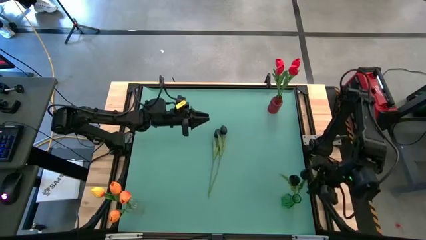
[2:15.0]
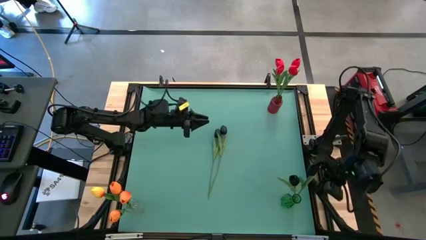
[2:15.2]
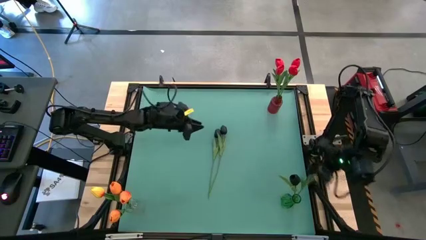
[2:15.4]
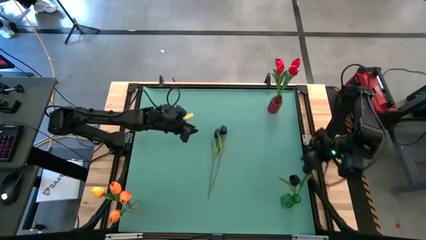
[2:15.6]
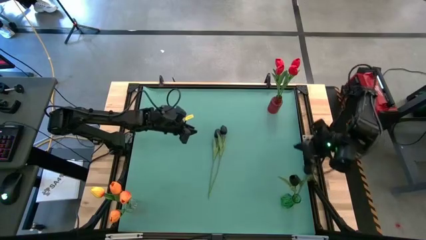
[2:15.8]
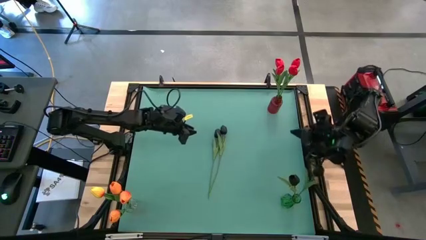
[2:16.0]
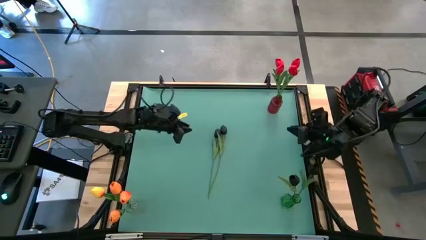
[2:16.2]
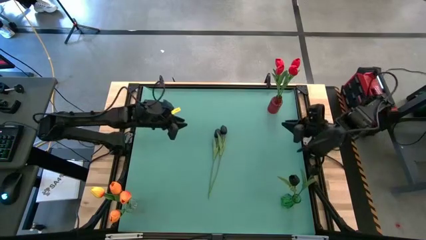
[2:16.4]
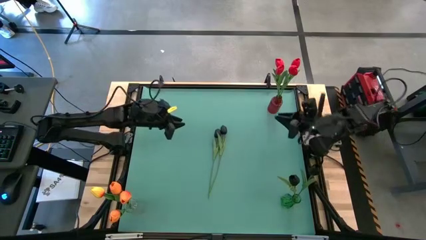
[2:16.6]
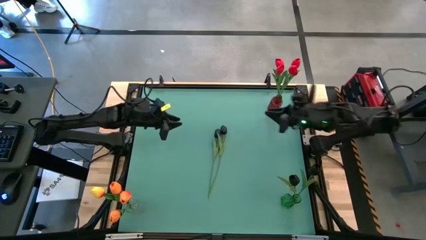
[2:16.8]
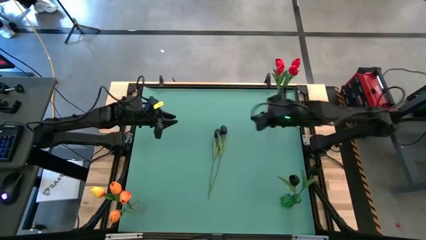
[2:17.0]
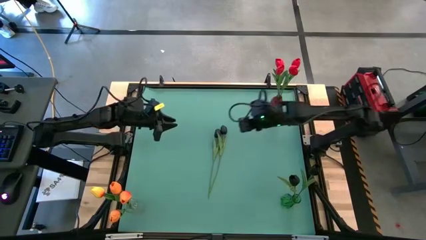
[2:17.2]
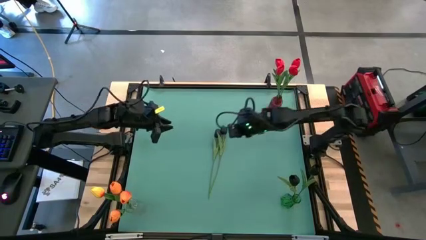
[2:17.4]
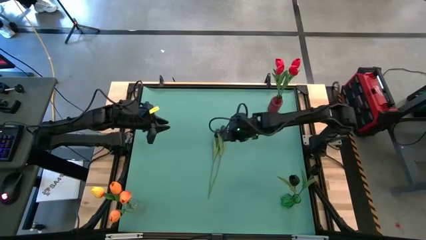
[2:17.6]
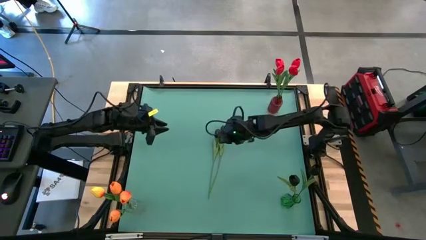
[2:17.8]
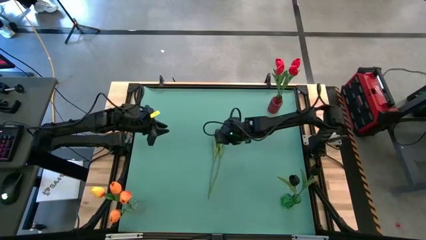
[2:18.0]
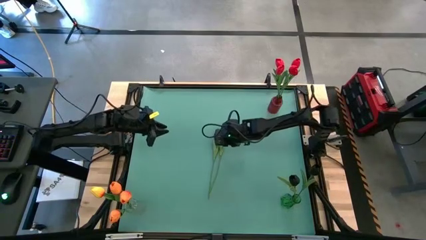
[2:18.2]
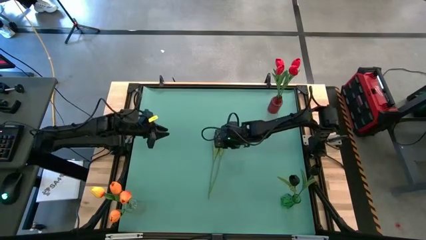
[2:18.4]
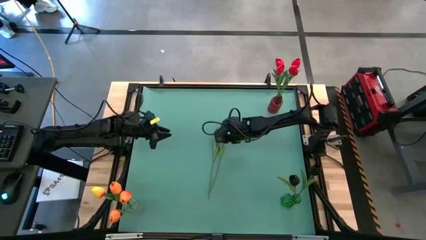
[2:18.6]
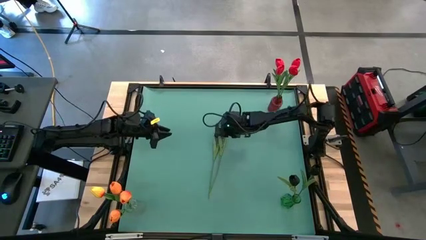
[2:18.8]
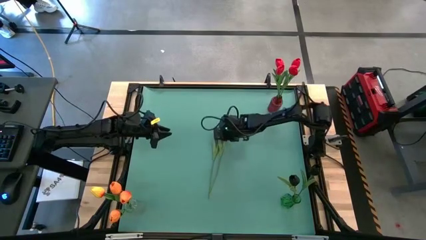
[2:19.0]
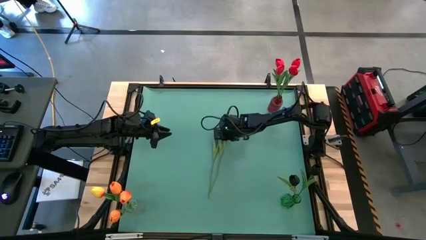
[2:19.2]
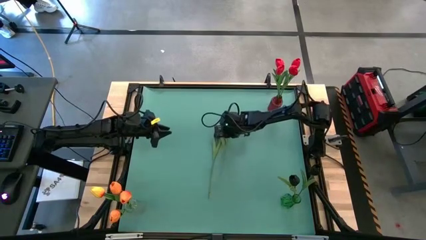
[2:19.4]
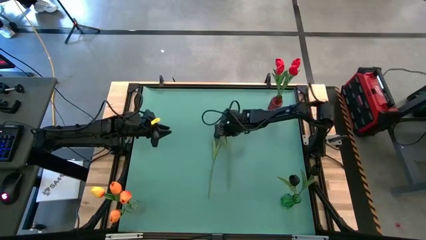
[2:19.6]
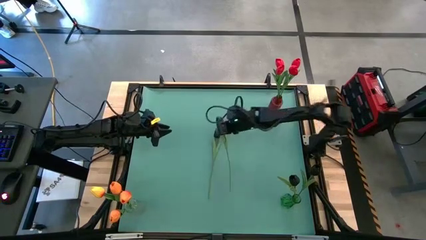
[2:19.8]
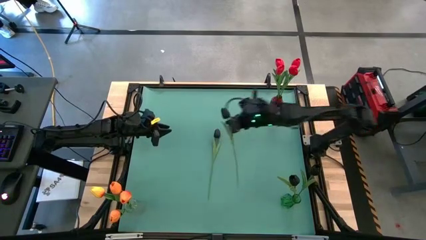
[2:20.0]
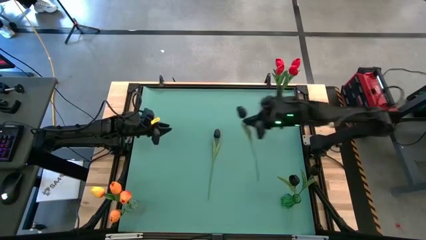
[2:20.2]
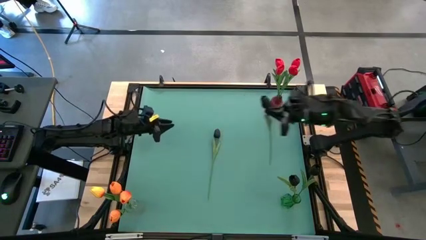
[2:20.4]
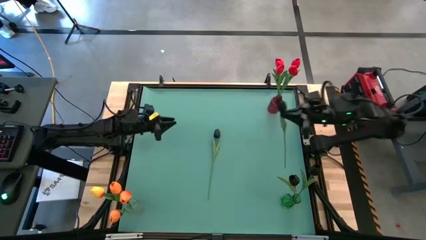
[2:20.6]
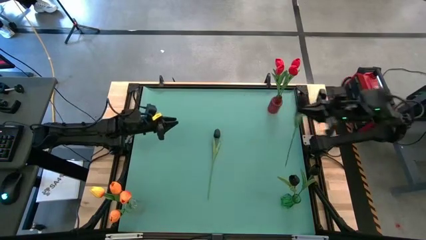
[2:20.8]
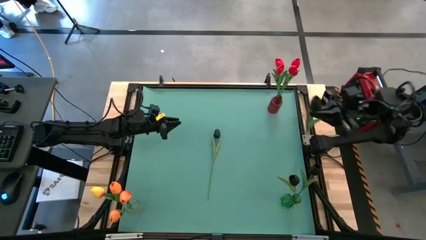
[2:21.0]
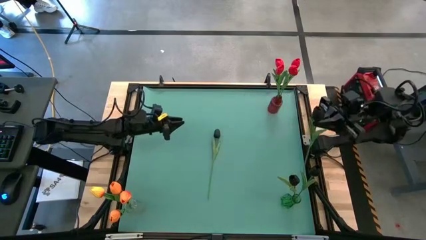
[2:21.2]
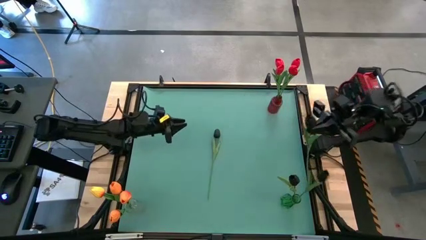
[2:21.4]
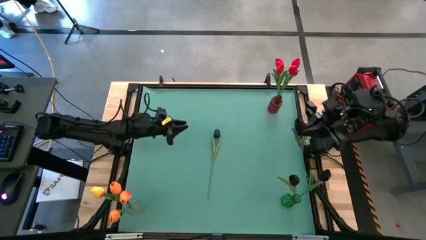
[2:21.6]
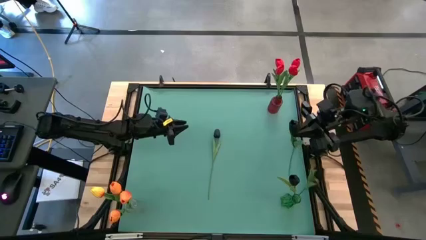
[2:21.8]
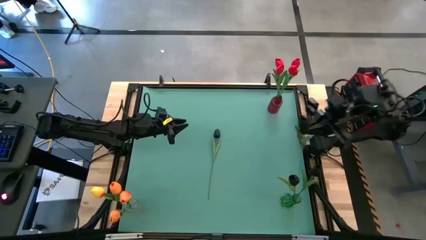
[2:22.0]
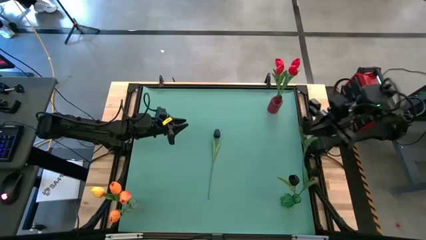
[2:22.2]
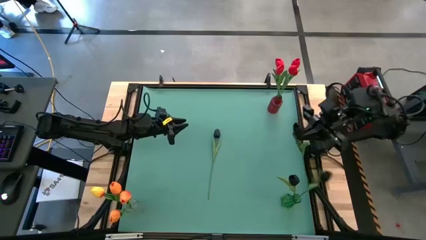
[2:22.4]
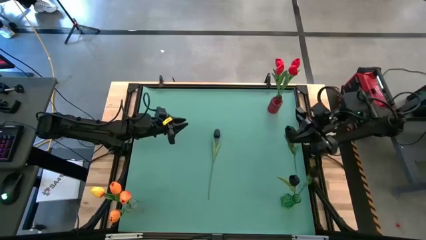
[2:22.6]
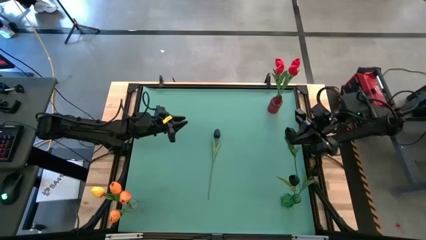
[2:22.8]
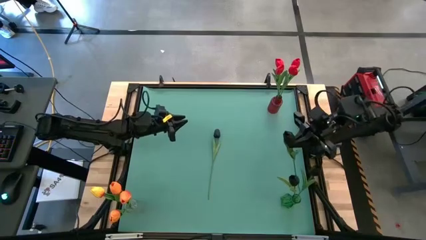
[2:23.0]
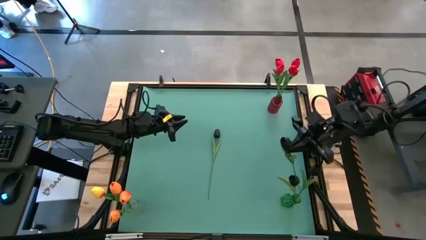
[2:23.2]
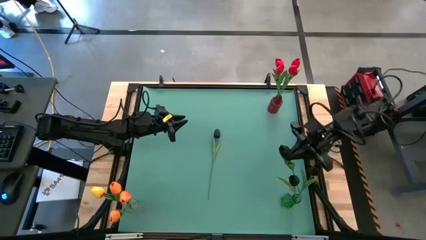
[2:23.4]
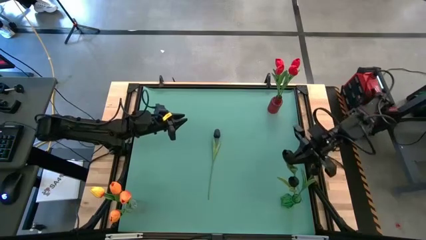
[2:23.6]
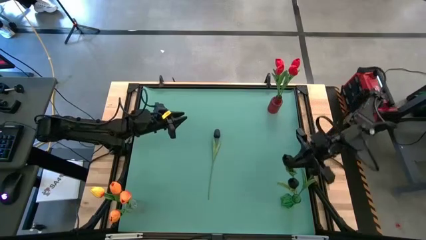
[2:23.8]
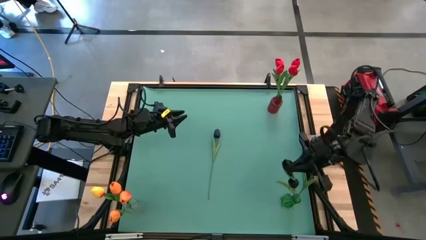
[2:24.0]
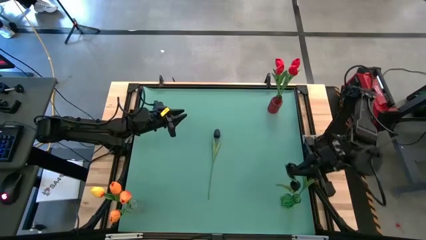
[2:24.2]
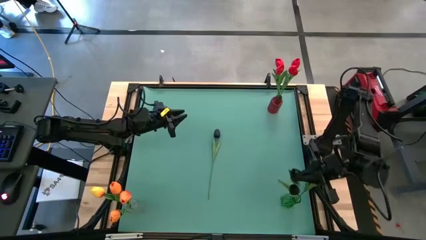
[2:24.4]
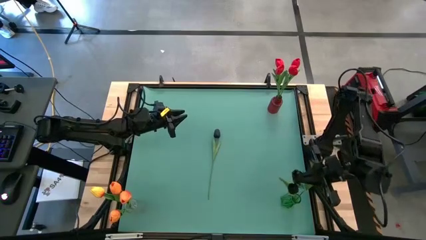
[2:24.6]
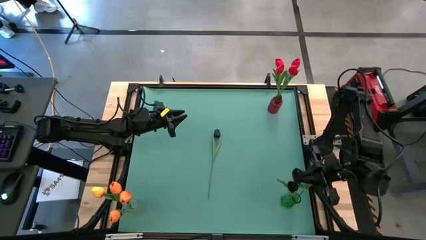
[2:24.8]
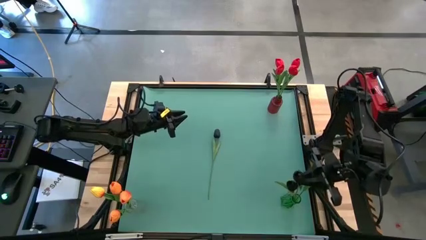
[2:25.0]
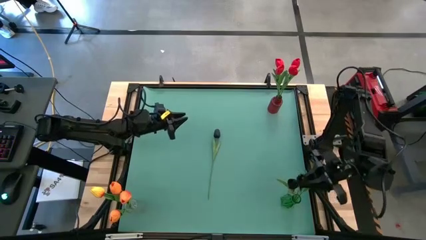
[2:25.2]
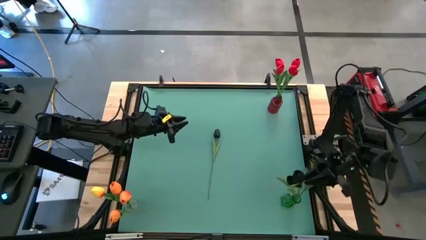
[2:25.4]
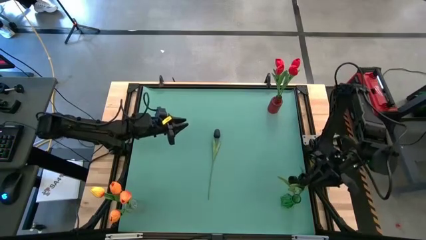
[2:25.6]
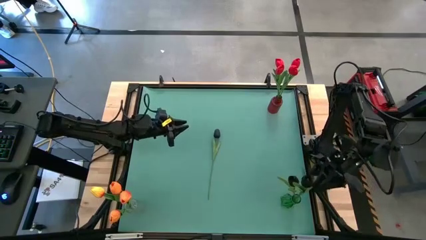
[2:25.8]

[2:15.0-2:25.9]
Task: Sort flowers into vase by color
Put the black tulip into the green vase

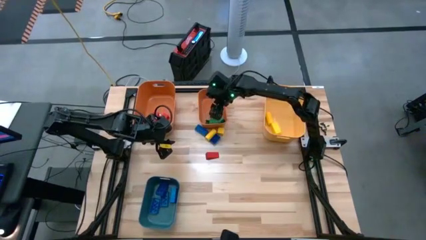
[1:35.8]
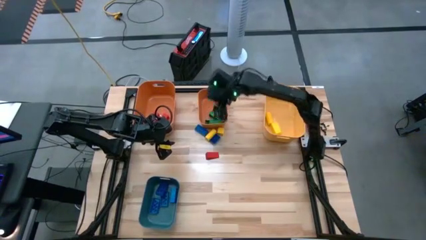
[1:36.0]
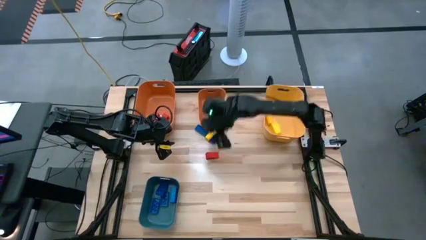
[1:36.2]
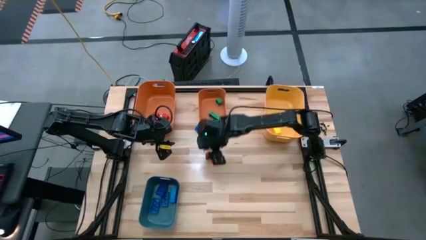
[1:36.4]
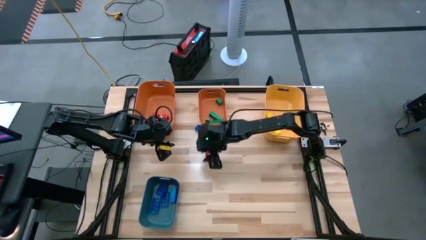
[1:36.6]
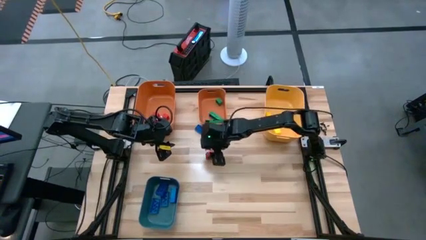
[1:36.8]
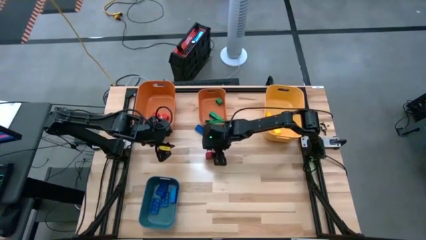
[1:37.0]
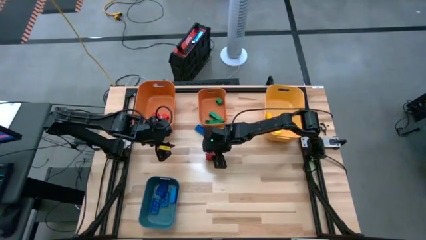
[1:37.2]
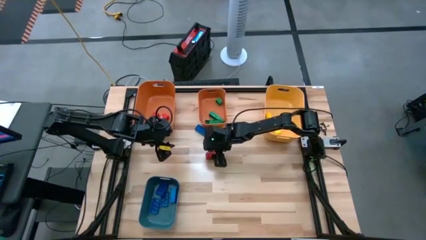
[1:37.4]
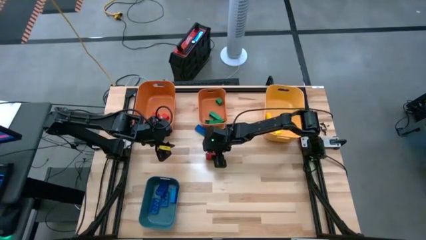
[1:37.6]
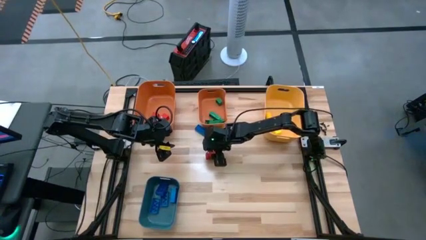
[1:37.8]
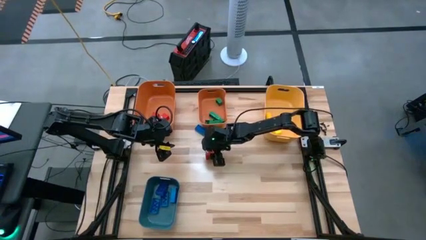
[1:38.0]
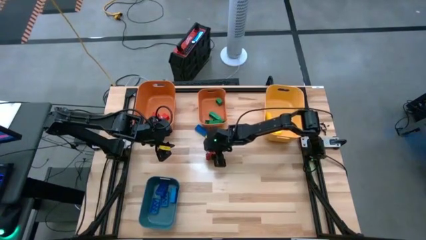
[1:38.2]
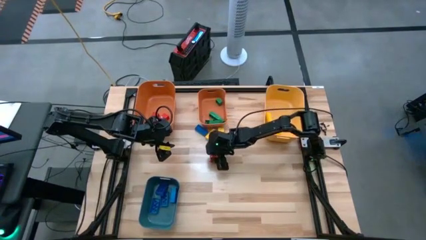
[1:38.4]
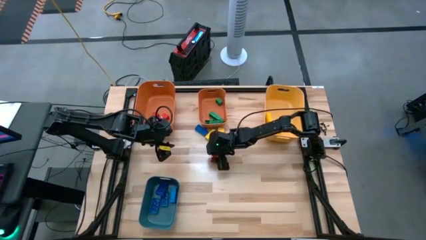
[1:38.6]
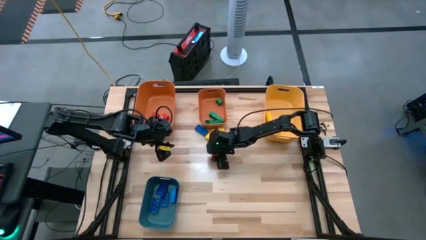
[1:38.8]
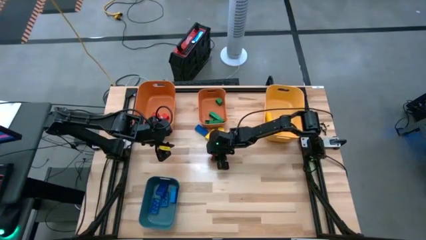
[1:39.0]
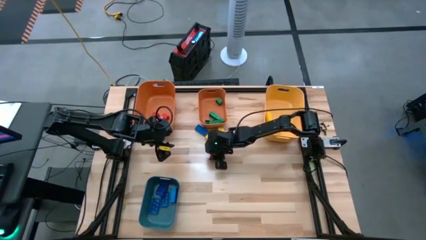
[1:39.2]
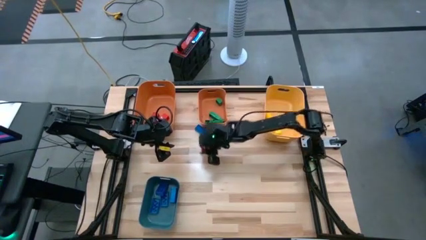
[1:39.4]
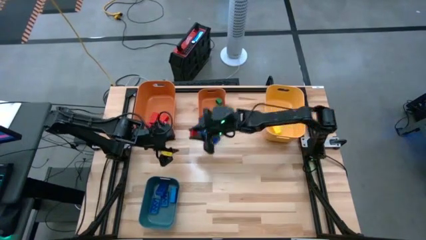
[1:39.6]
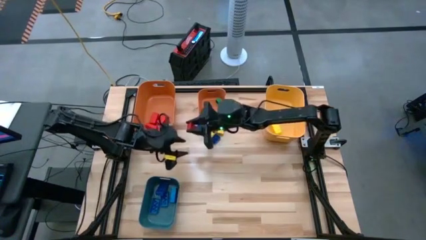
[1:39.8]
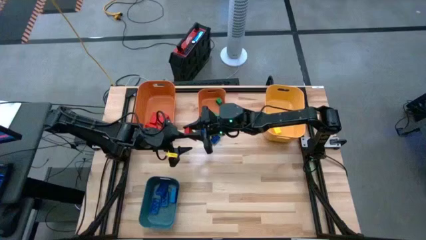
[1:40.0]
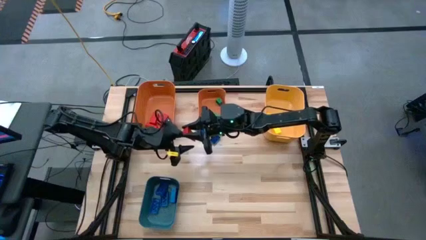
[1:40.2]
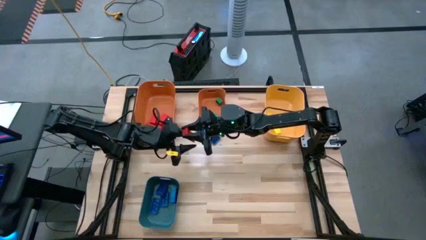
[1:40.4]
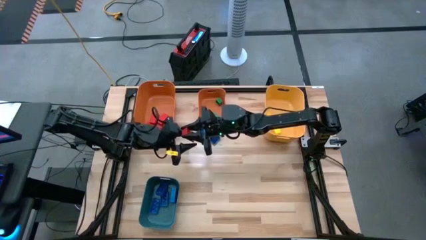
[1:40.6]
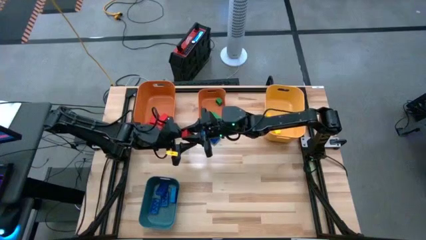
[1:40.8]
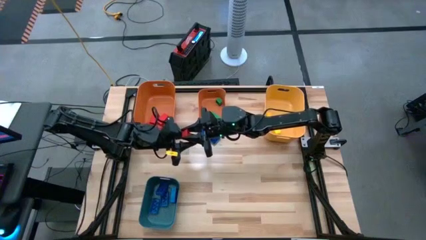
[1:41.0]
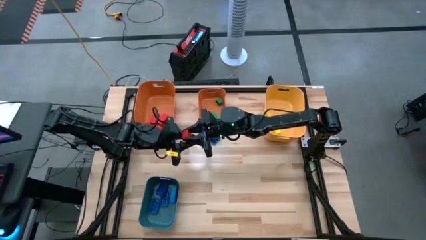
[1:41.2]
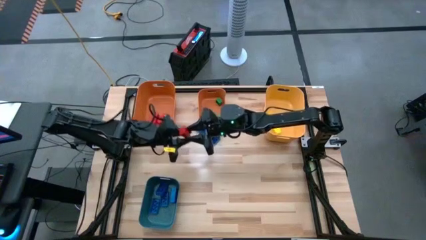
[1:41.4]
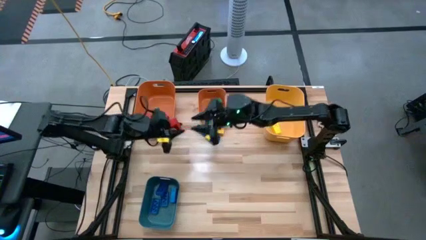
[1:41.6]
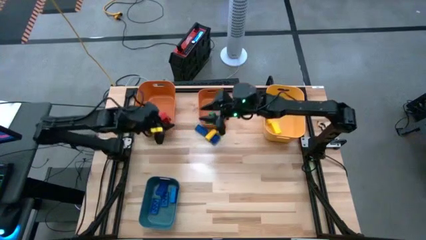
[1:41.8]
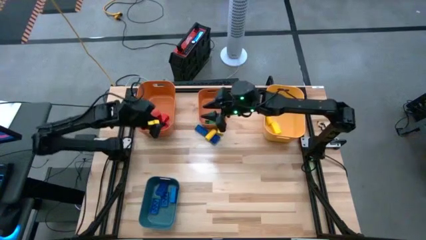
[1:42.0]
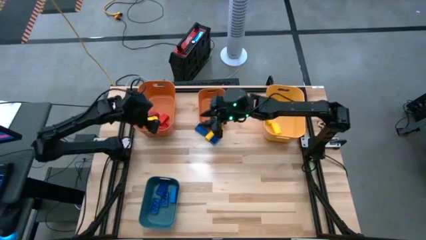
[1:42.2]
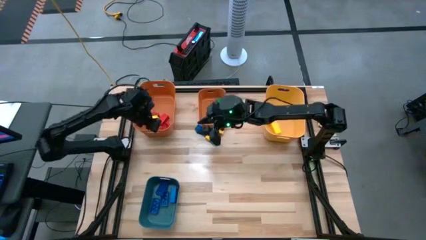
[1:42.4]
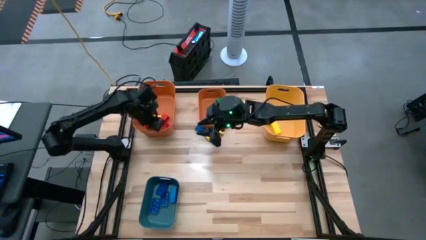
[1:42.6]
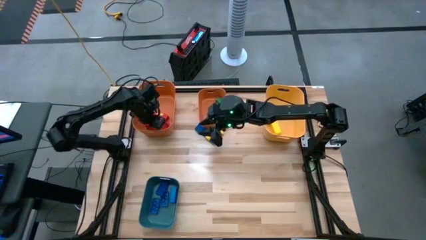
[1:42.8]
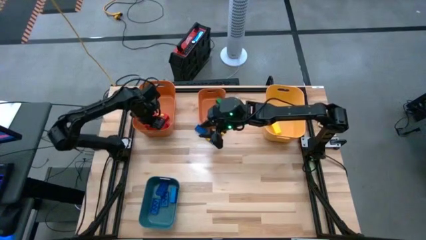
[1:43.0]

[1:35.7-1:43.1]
Task: Sort blocks
Put the red block into the left orange bin
